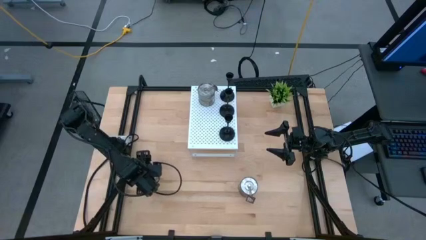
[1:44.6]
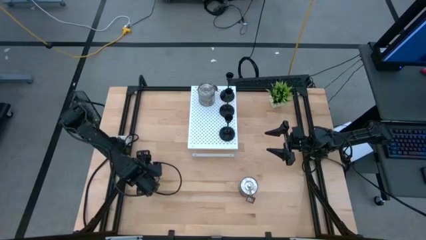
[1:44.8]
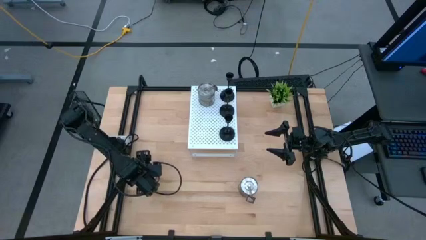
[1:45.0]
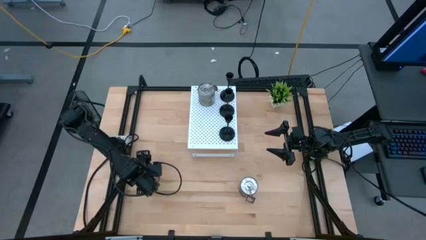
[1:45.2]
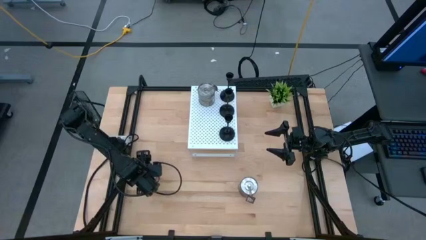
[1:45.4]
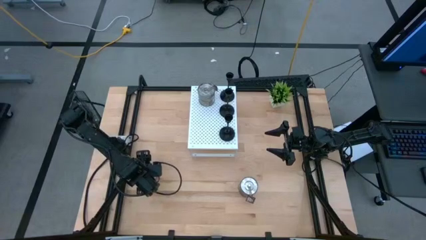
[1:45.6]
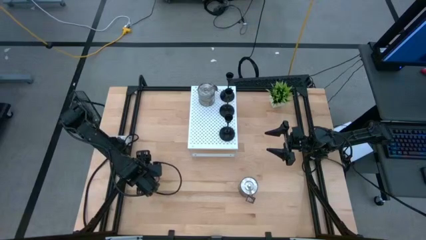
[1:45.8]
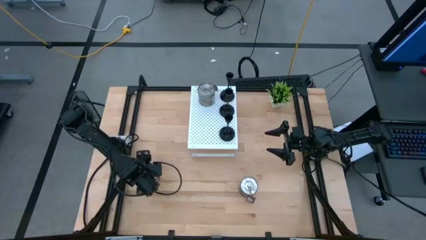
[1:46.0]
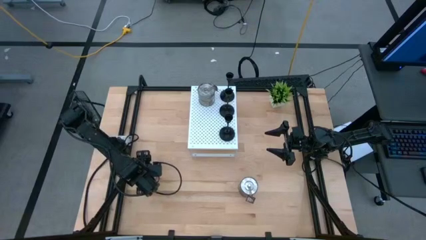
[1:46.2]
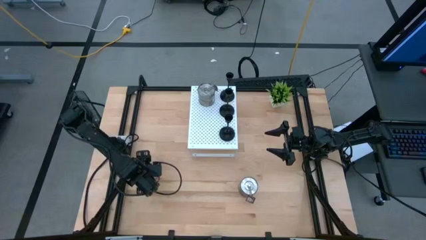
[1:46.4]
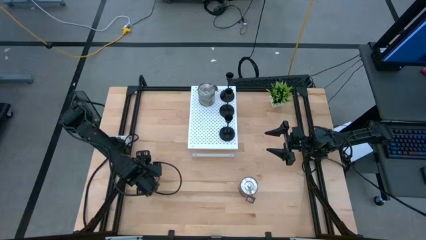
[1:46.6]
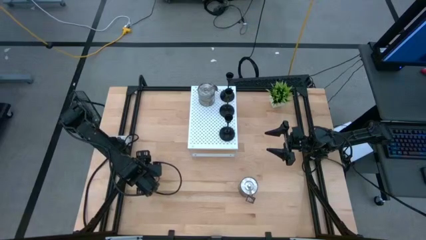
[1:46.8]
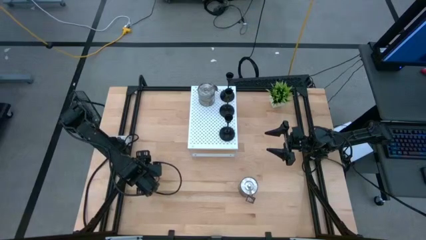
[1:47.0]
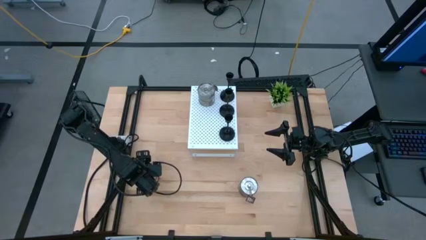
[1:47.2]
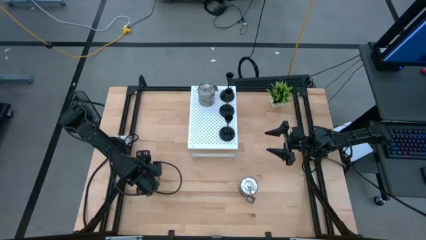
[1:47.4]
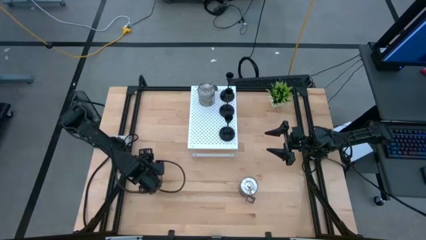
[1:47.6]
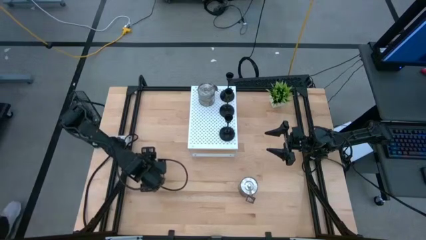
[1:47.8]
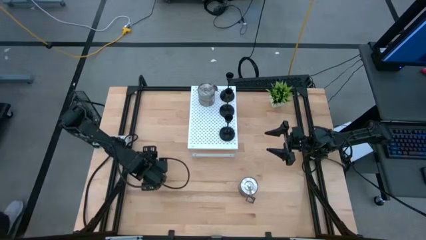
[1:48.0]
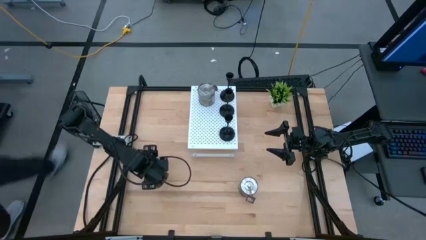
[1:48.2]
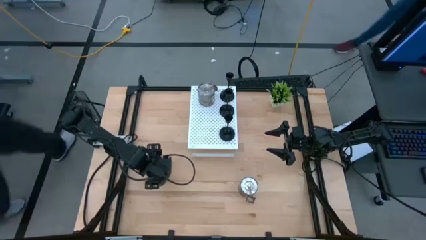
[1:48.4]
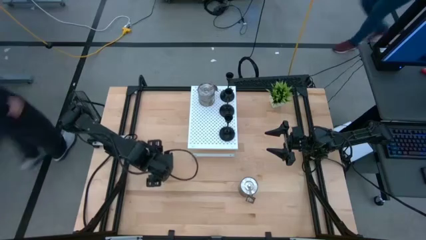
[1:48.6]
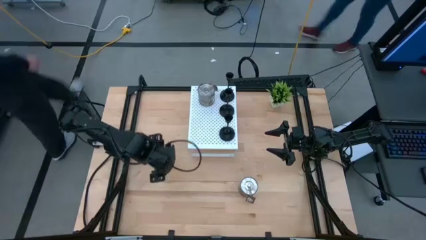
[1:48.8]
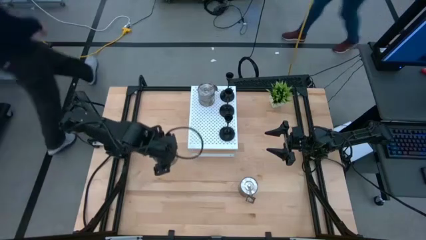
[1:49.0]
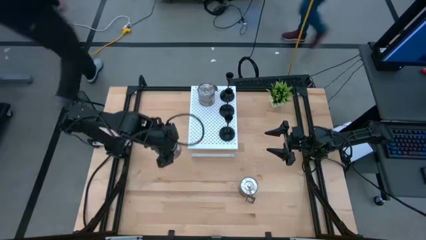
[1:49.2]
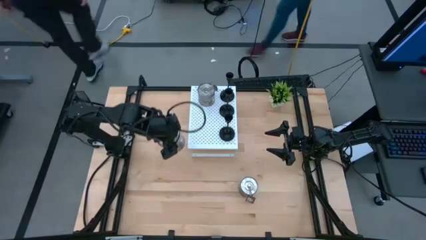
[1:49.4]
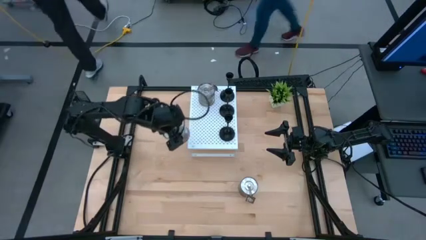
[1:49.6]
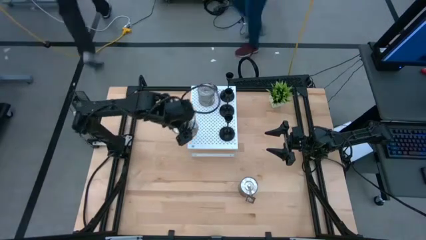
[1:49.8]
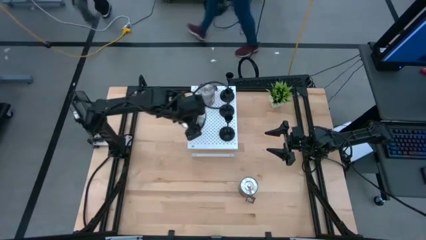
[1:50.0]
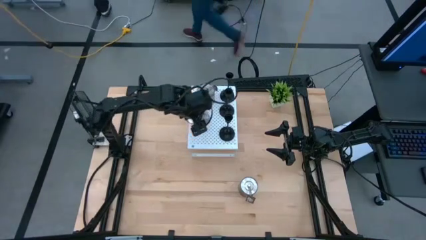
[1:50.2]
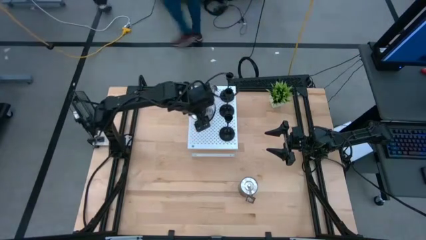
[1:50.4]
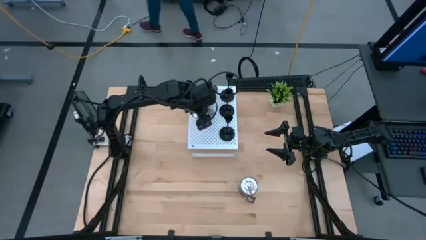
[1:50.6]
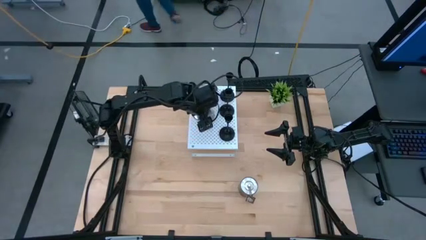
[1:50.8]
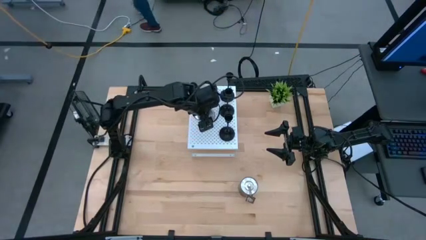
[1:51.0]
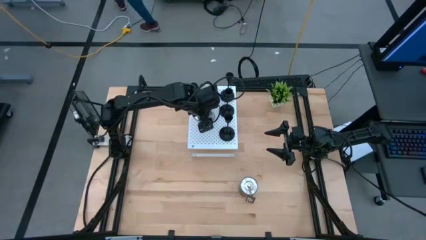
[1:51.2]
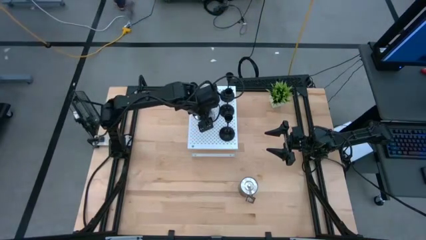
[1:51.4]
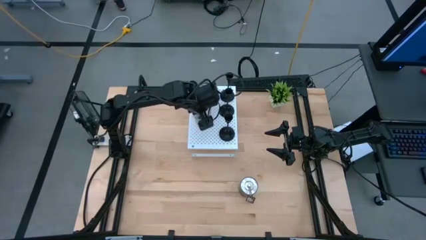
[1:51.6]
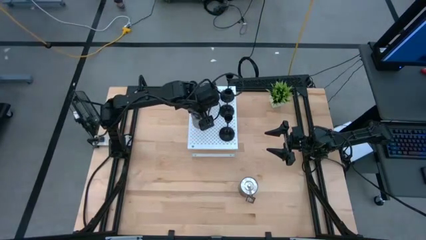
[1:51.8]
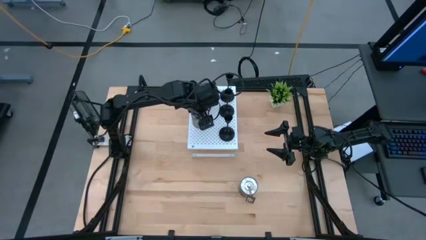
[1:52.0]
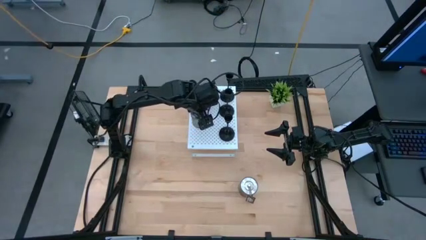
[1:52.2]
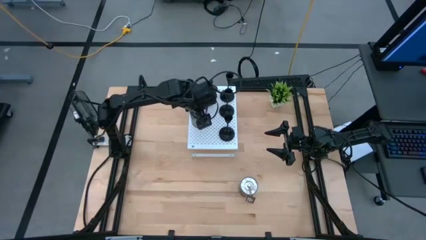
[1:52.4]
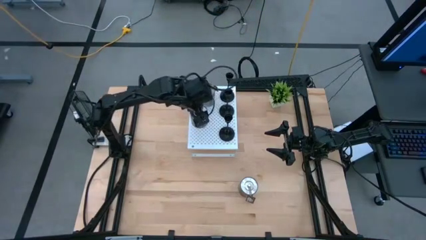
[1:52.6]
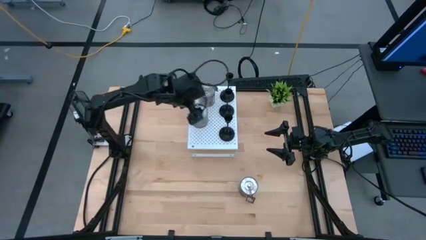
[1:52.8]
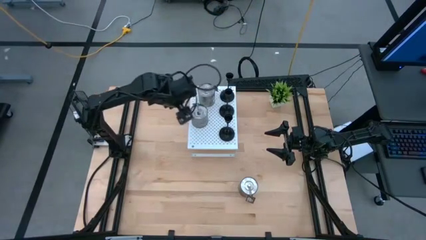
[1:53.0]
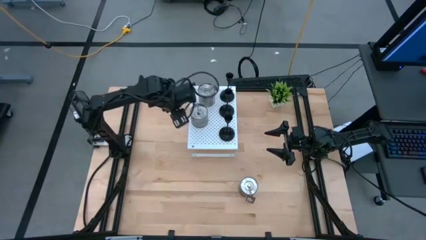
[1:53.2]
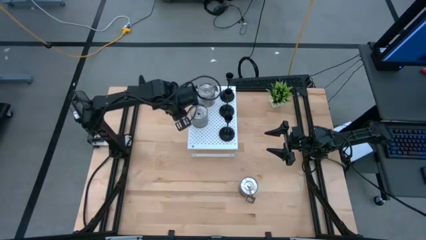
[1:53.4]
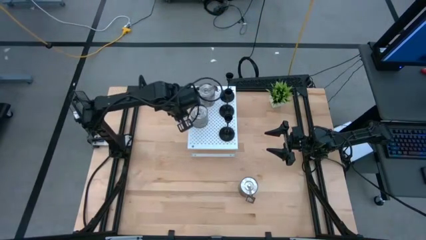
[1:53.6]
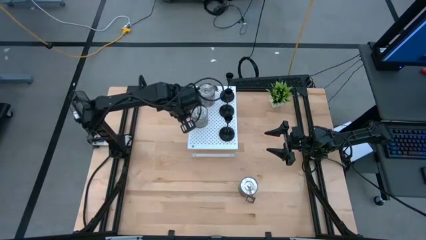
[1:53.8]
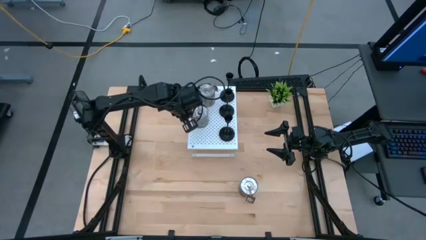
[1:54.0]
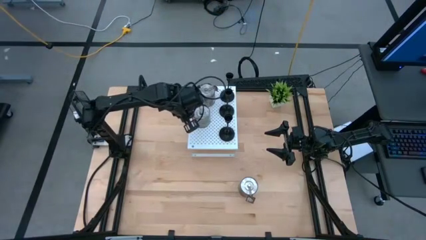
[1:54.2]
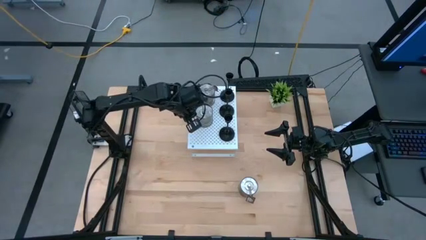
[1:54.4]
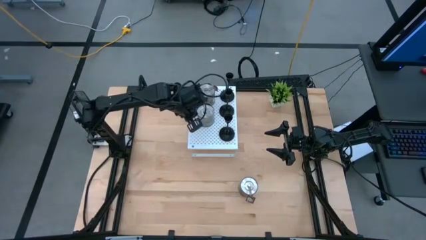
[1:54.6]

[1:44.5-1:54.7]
Task: Pick & Place candle stick holders
Put the left silver scented candle on the shelf aligned with the other silver scented candle

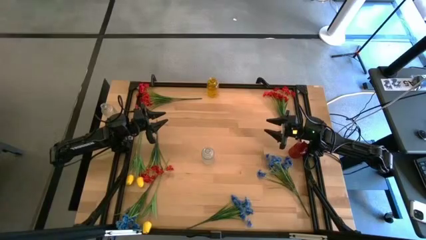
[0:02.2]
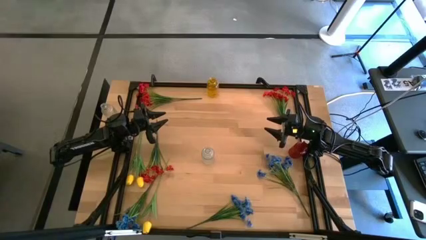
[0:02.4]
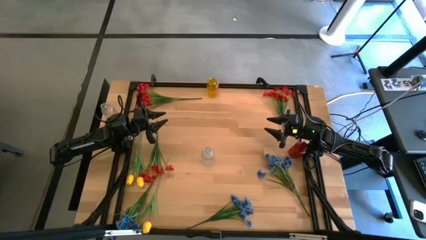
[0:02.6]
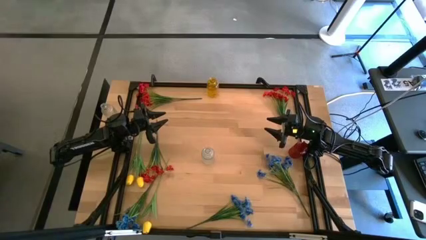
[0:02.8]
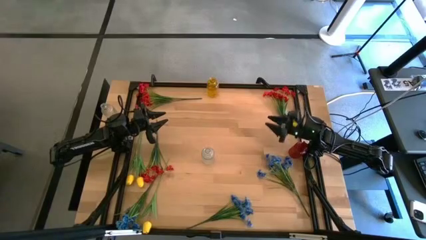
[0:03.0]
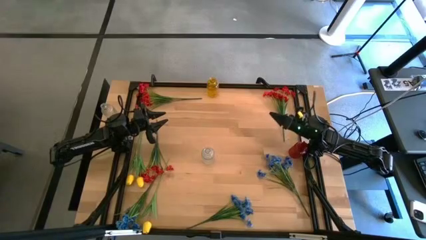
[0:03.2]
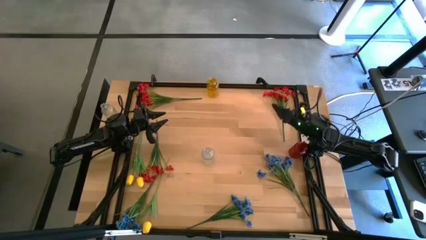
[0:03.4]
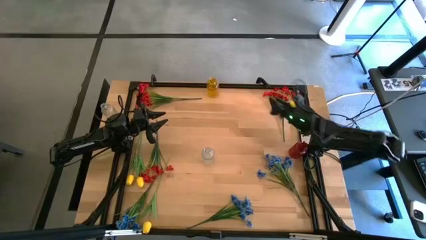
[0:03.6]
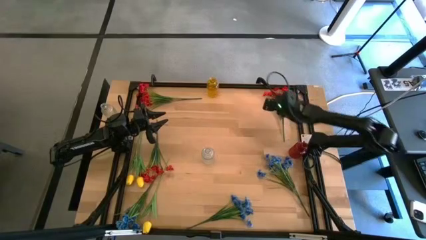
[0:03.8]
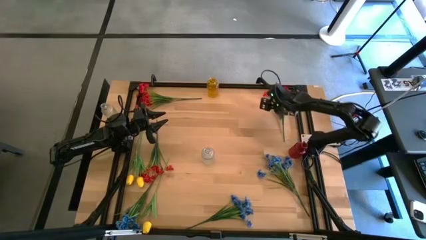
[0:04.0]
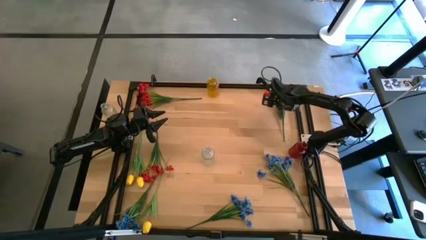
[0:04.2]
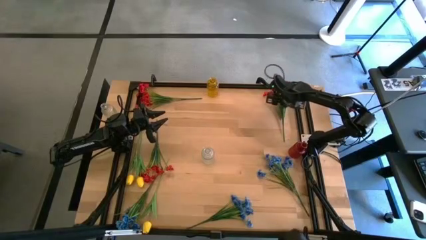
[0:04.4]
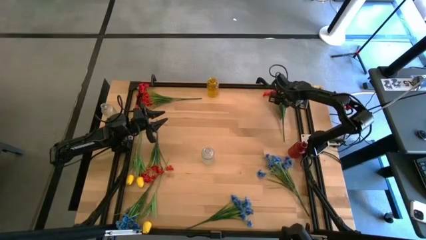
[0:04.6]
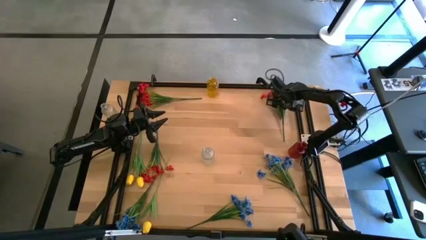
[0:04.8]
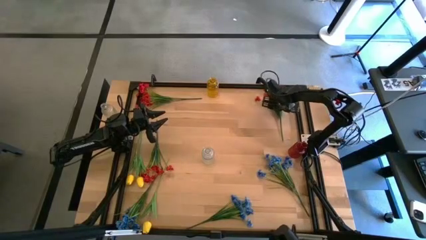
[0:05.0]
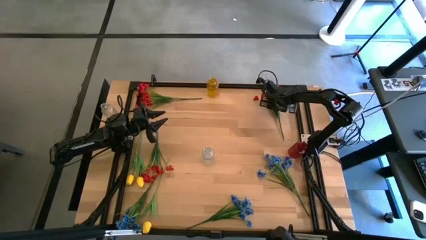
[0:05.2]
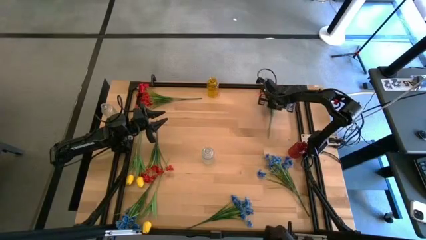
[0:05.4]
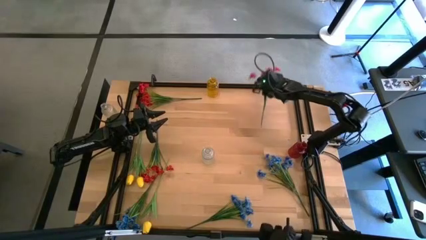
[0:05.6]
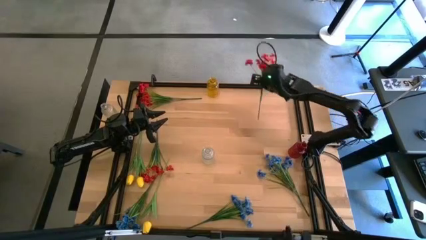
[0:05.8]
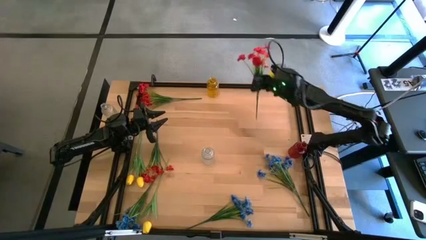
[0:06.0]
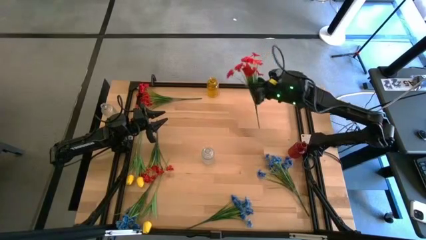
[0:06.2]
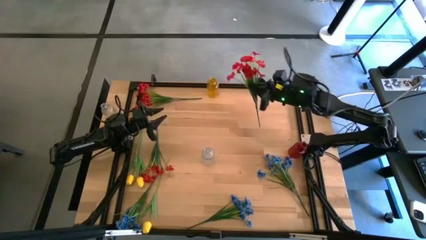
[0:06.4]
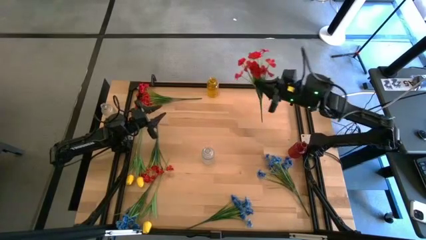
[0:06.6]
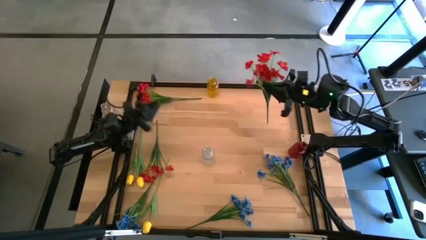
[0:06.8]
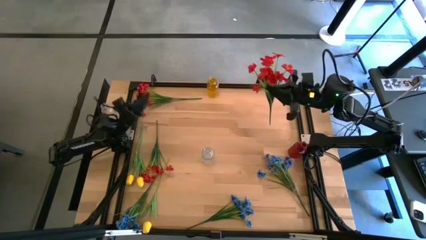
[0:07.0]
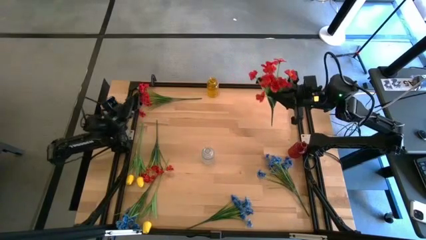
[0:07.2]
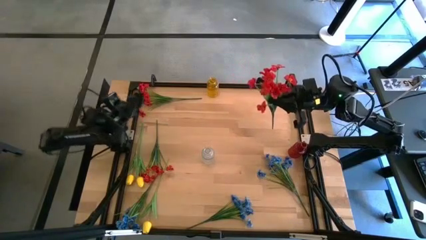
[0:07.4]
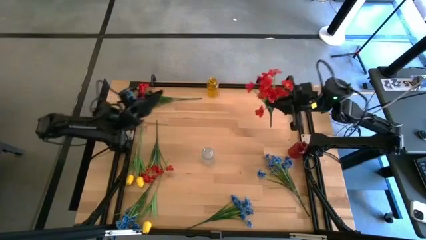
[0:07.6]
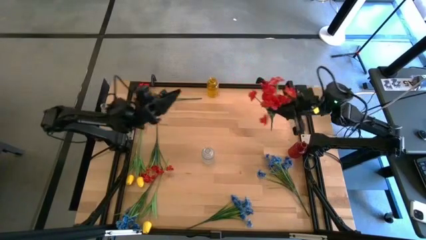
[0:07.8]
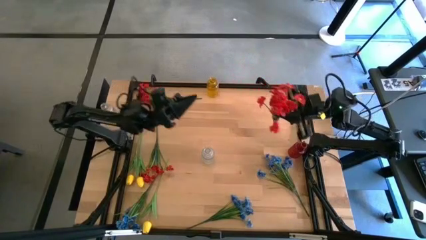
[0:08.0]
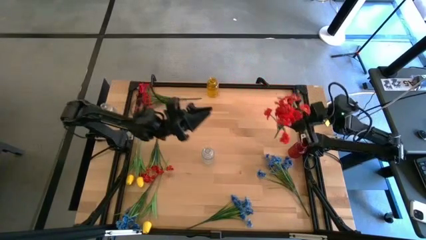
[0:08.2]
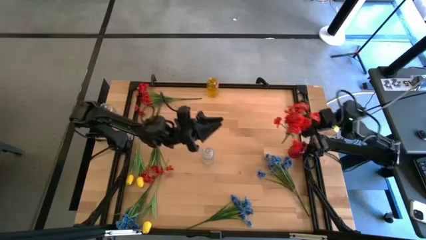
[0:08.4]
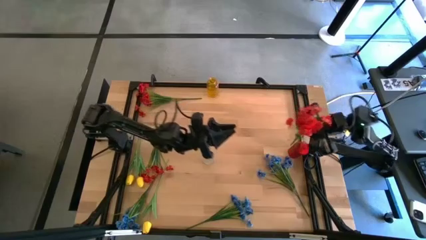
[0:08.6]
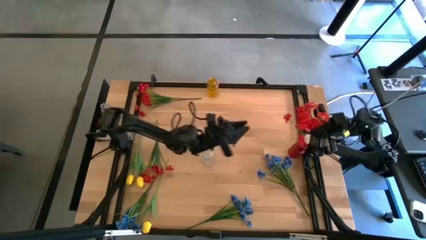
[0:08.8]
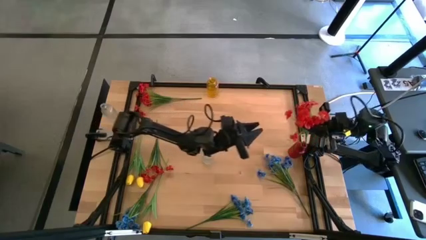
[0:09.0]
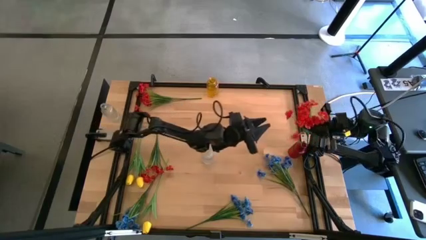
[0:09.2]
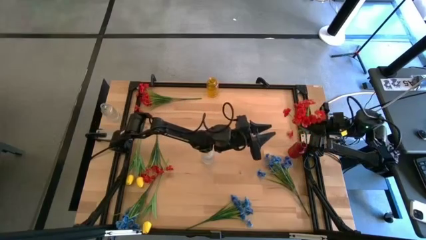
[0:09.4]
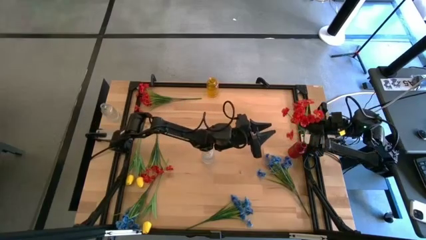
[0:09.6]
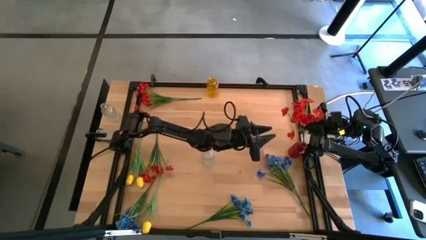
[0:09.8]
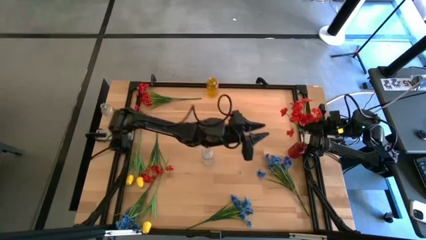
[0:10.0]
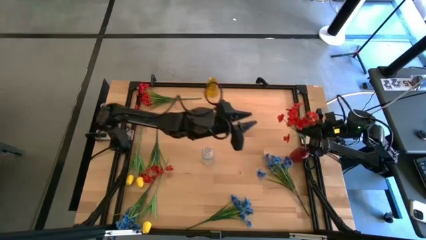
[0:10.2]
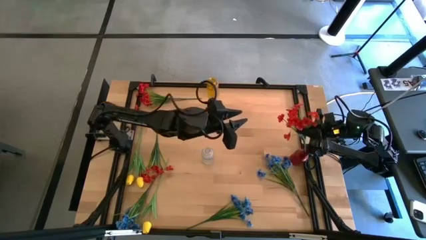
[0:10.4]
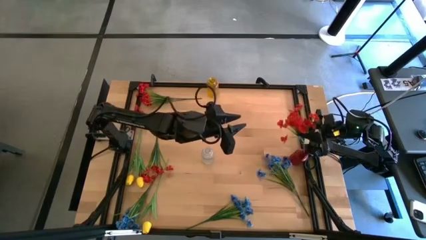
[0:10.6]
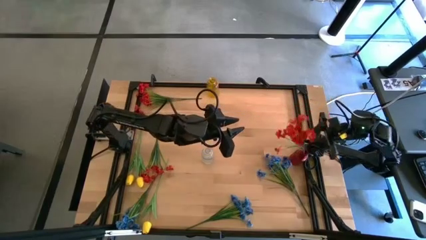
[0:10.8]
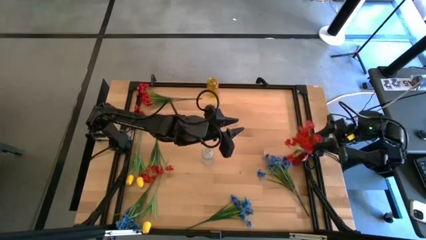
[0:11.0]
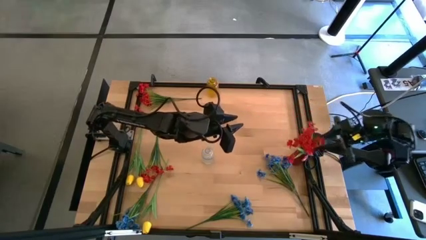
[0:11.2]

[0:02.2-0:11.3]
Task: Sort flowers into vase by color
Put the top right red flowers into the red vase
